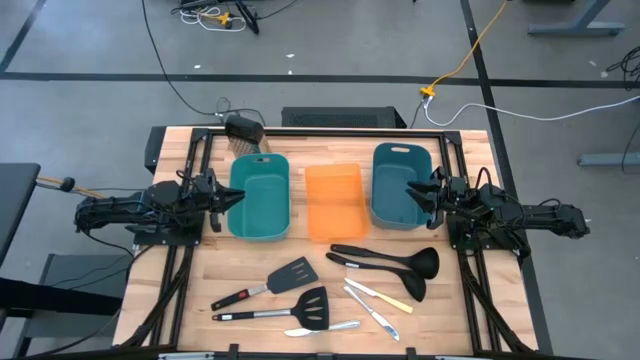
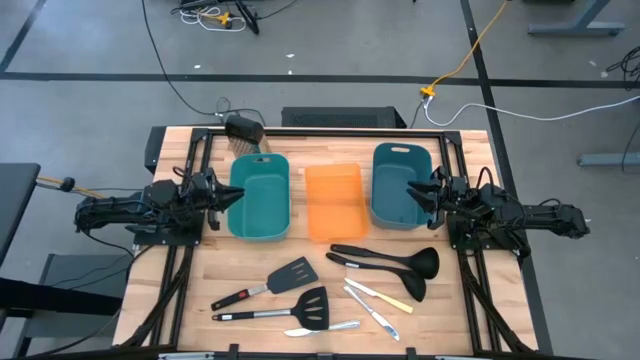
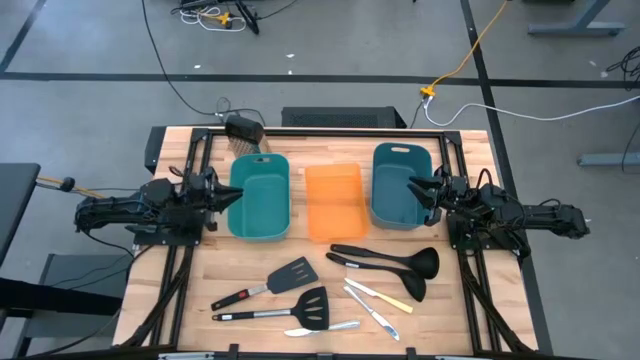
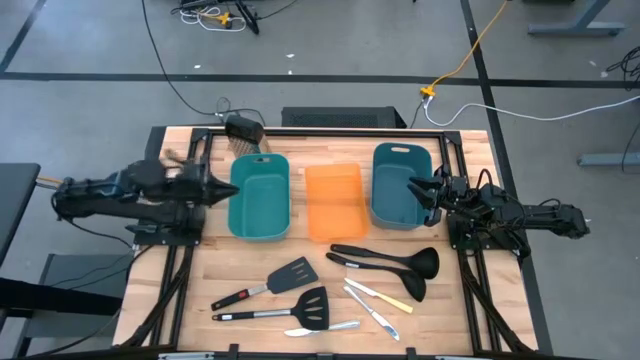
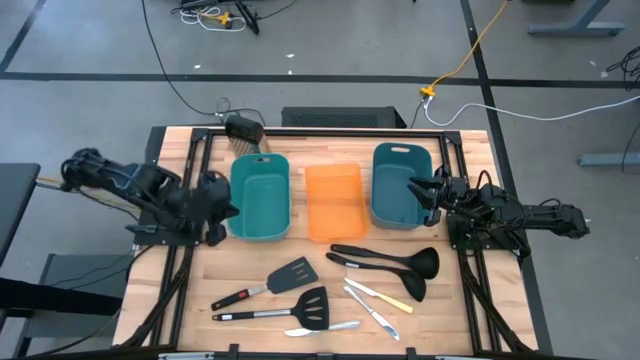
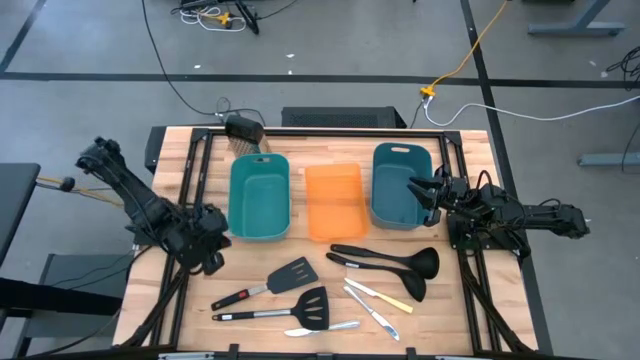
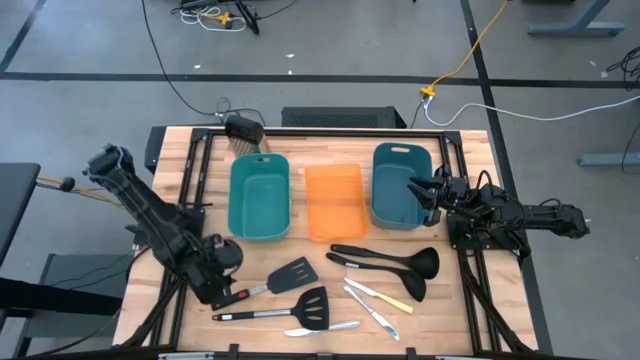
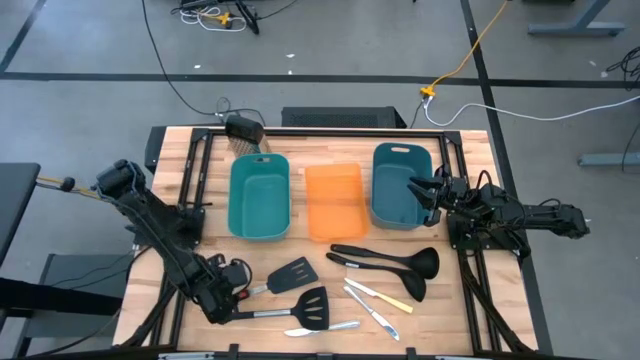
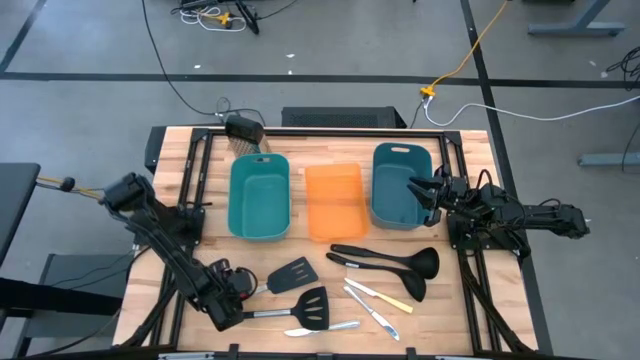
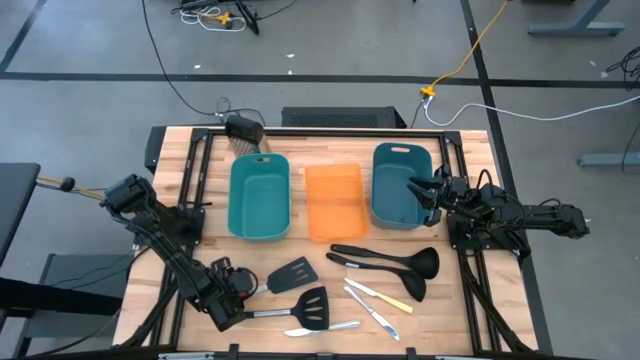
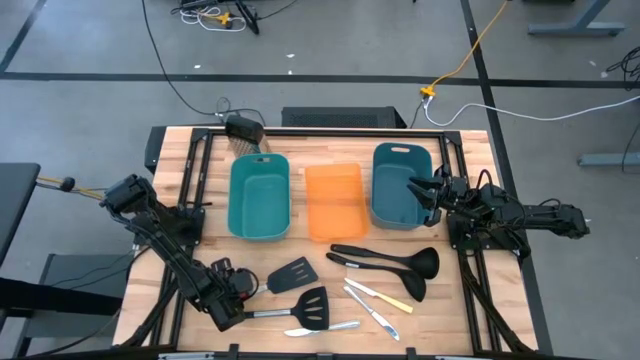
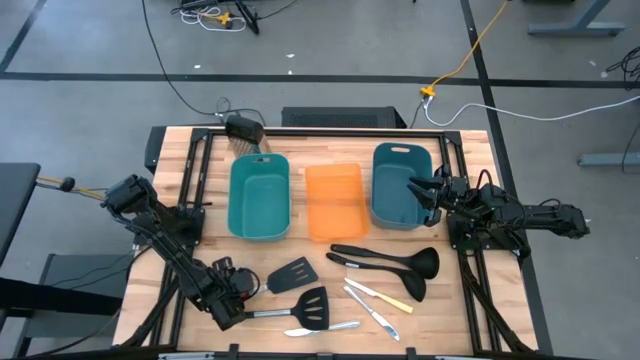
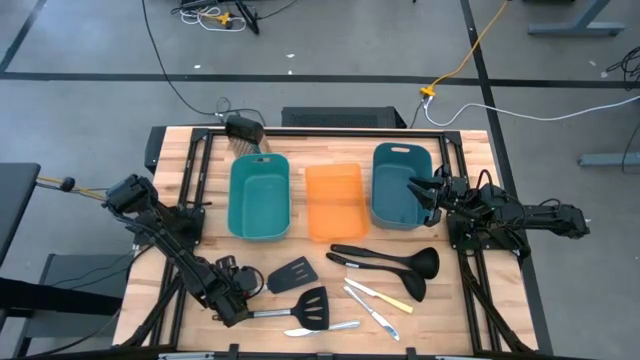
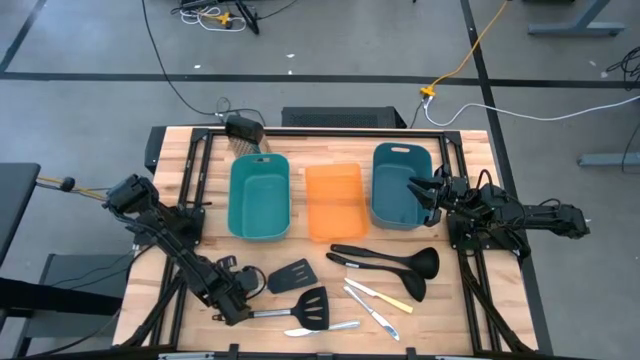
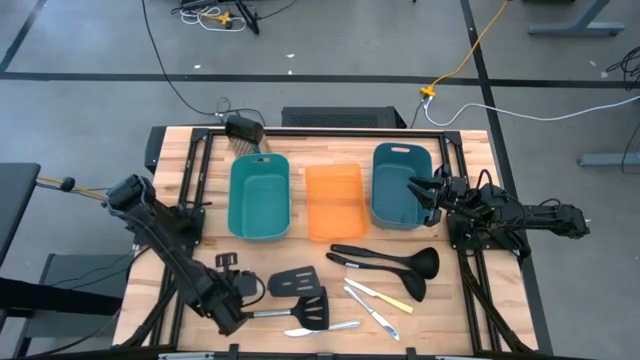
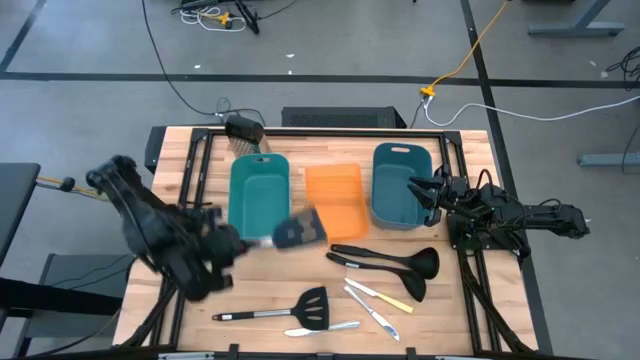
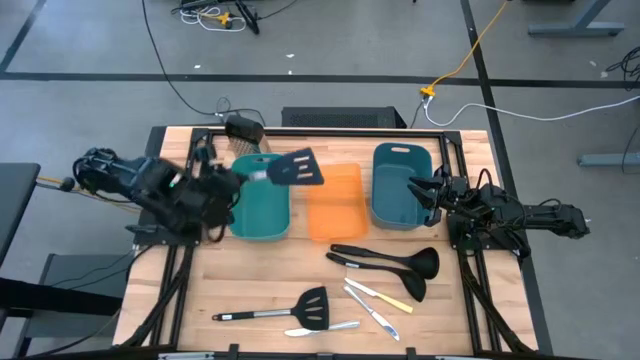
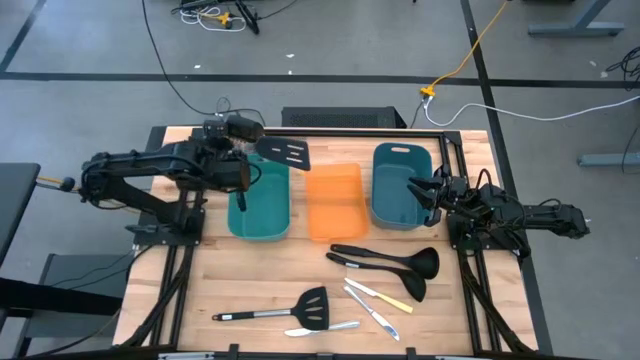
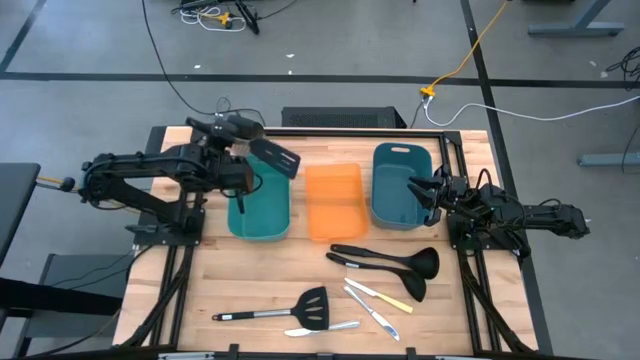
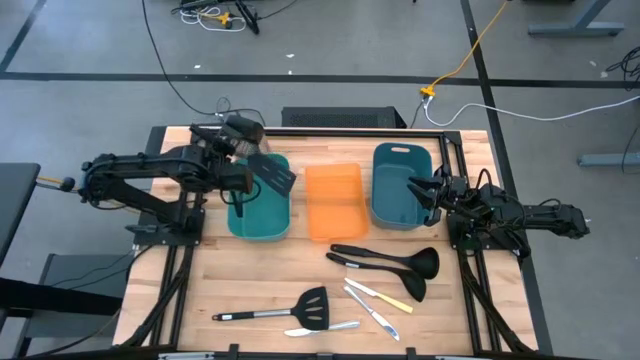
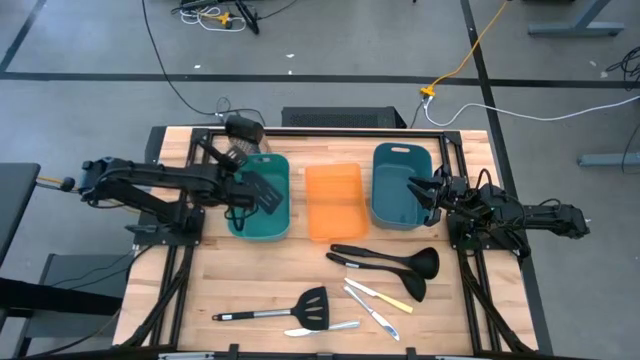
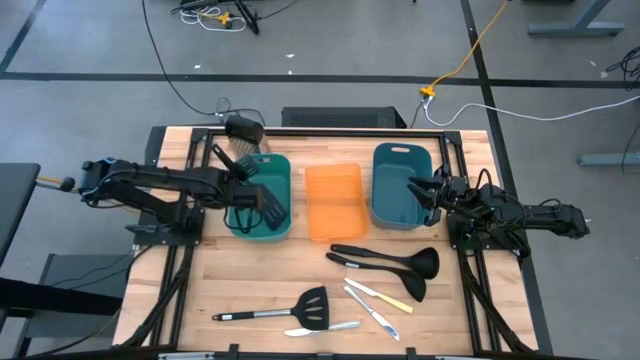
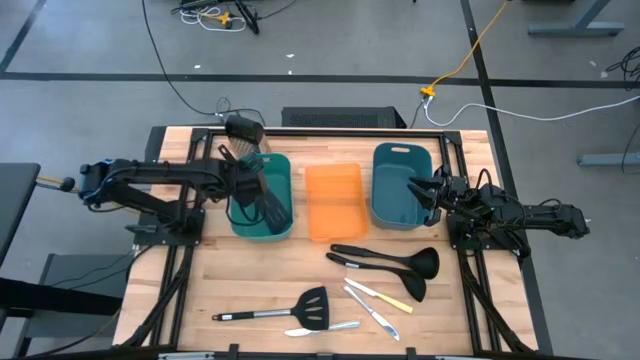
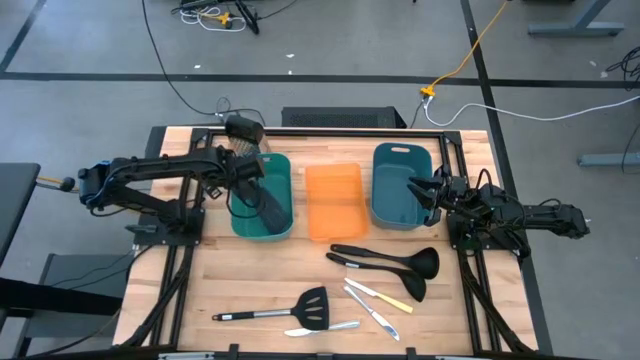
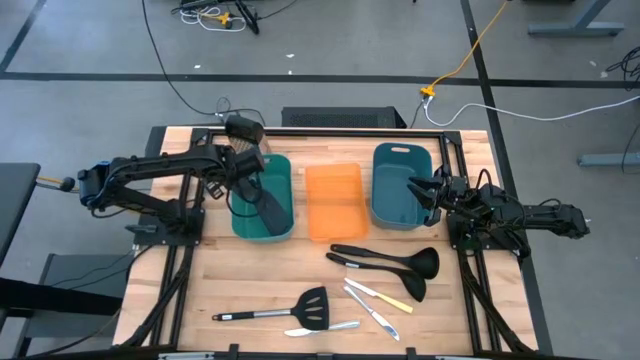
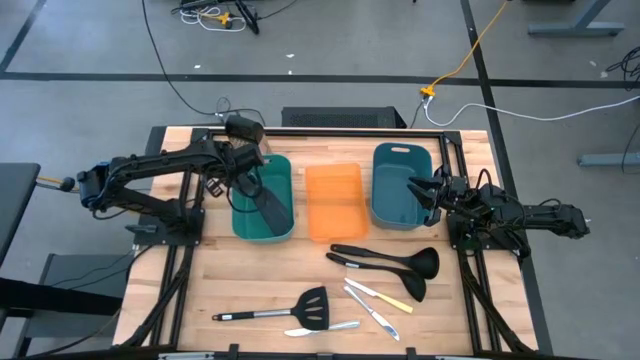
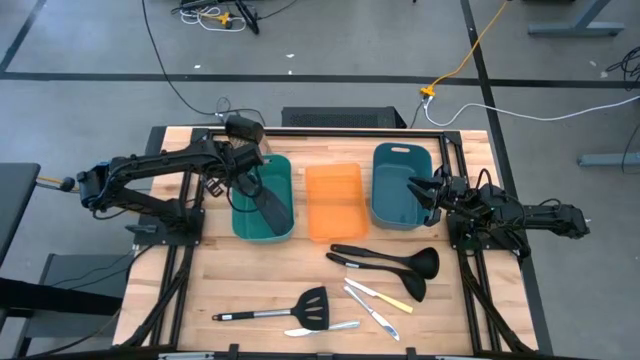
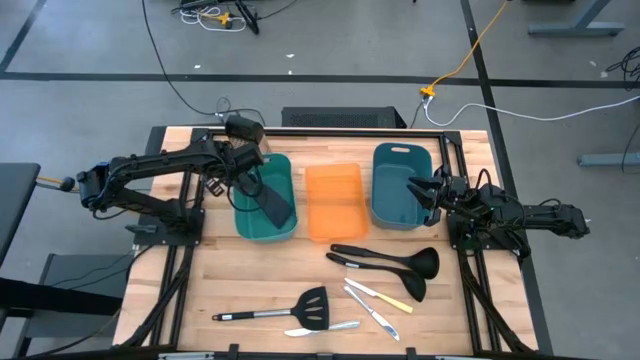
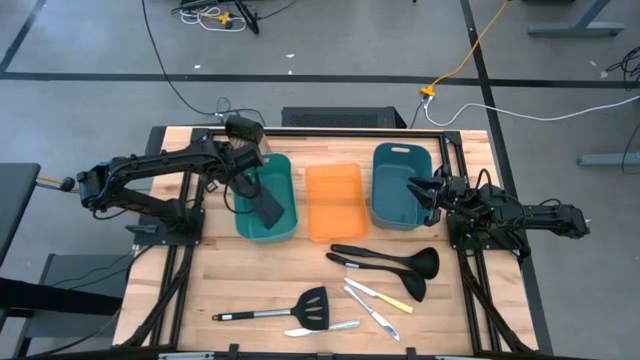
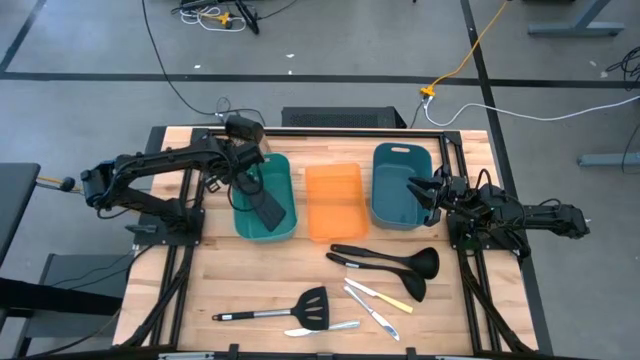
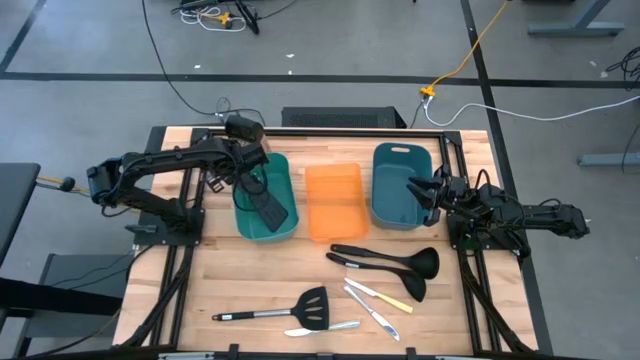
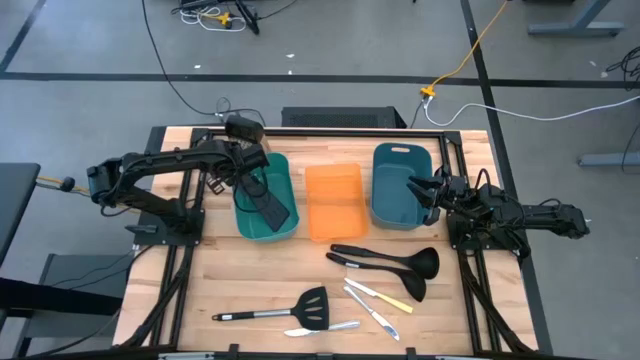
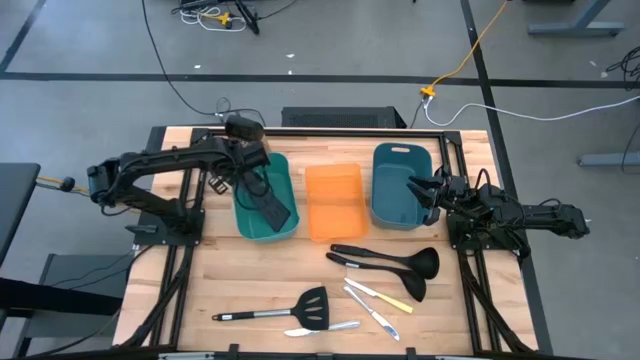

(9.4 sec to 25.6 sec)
Task: Pick & Place Kitchen Items
Put the dark gray spatula into the green bin
